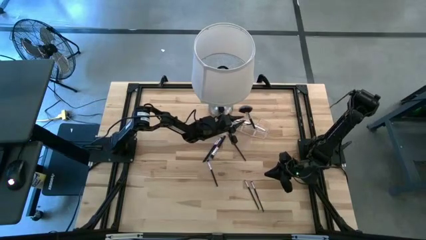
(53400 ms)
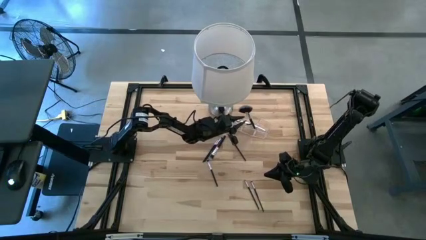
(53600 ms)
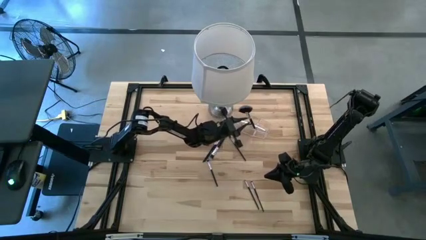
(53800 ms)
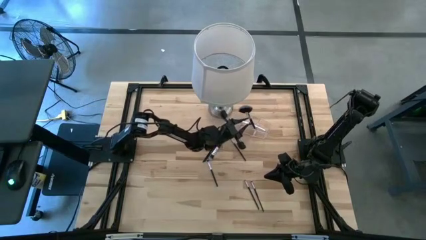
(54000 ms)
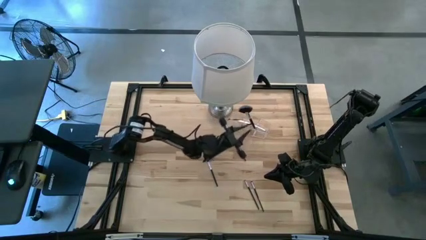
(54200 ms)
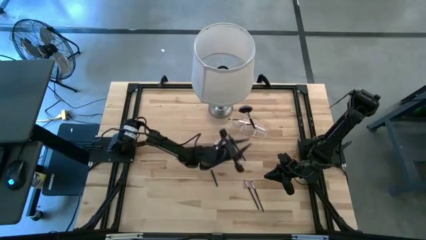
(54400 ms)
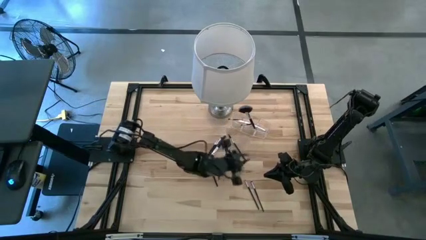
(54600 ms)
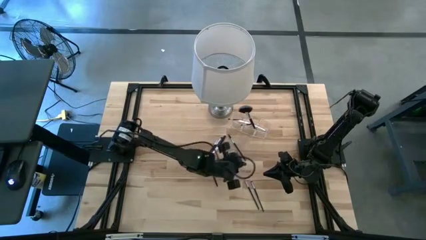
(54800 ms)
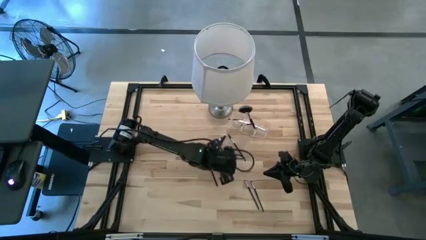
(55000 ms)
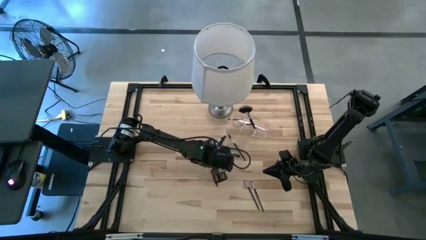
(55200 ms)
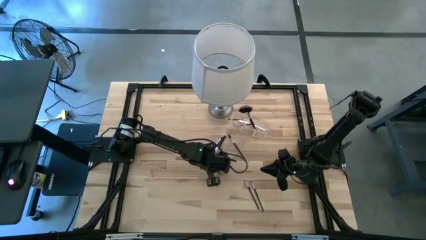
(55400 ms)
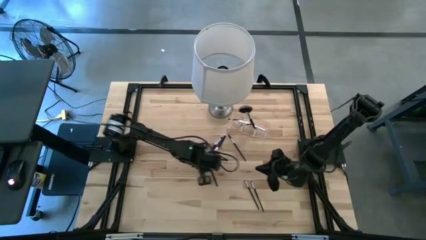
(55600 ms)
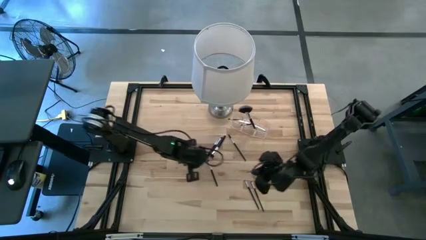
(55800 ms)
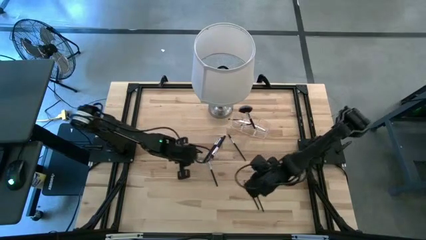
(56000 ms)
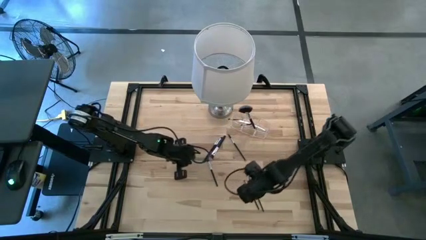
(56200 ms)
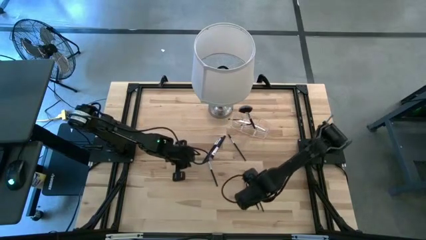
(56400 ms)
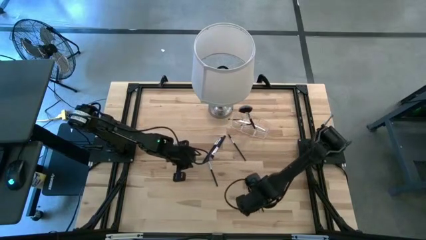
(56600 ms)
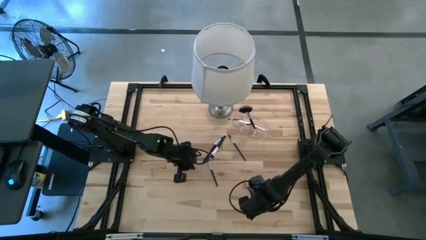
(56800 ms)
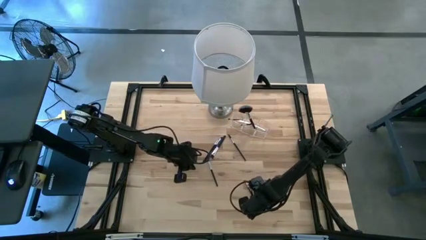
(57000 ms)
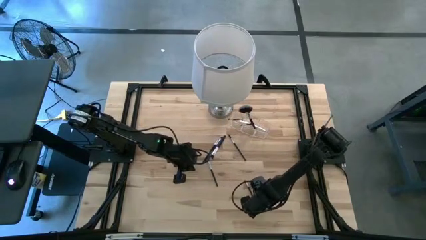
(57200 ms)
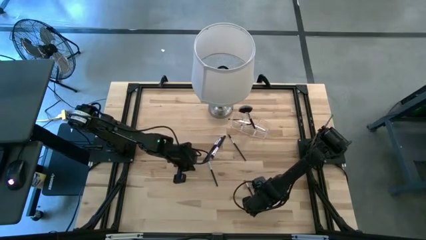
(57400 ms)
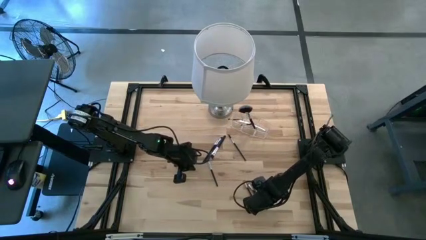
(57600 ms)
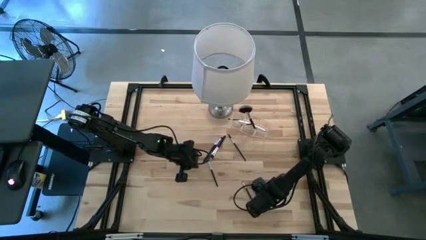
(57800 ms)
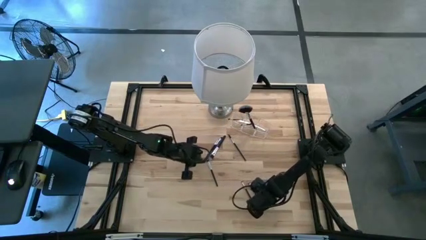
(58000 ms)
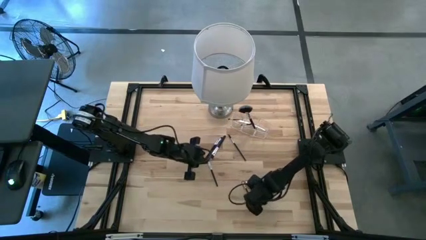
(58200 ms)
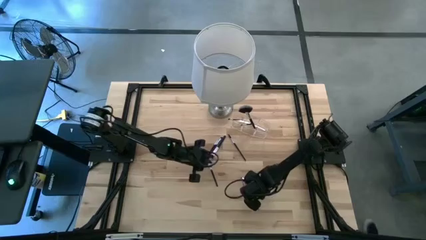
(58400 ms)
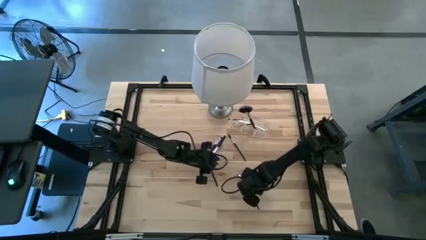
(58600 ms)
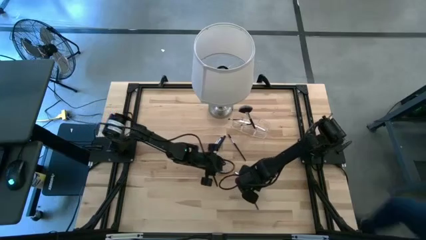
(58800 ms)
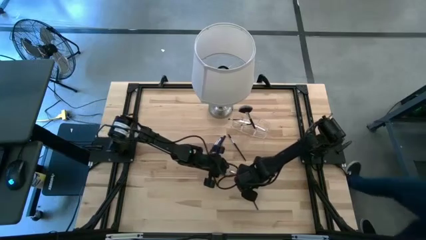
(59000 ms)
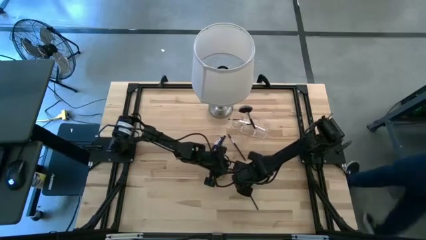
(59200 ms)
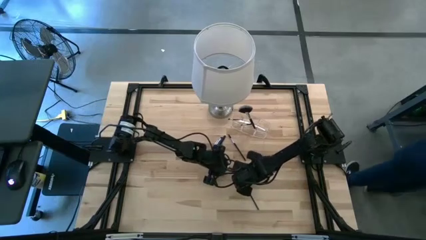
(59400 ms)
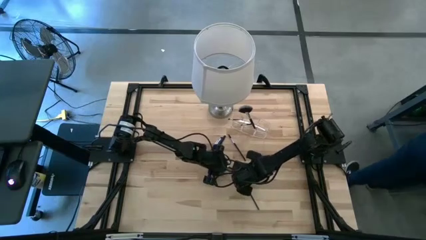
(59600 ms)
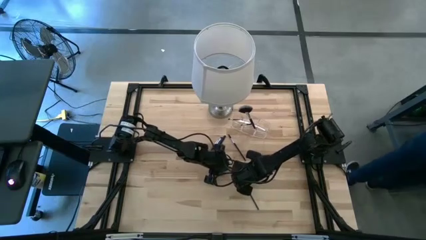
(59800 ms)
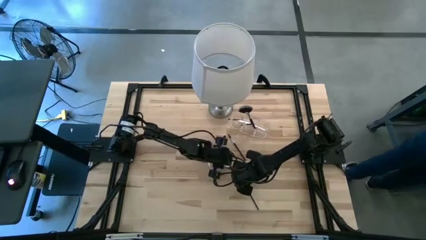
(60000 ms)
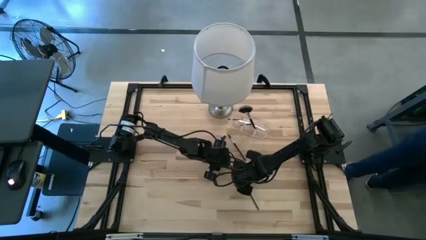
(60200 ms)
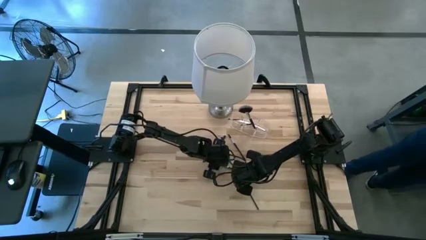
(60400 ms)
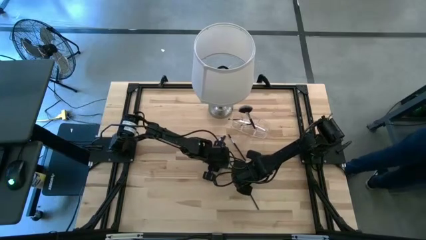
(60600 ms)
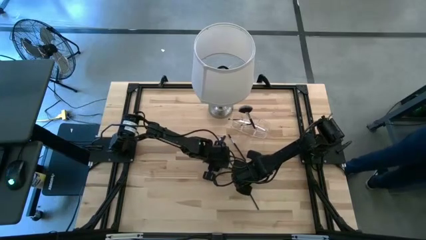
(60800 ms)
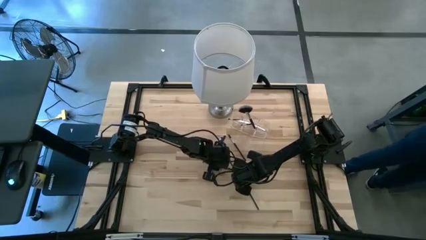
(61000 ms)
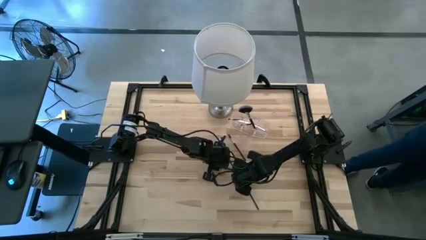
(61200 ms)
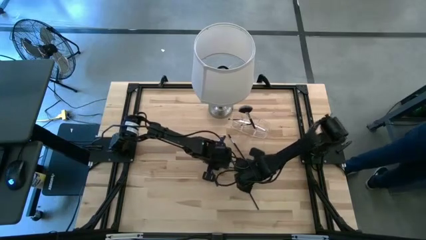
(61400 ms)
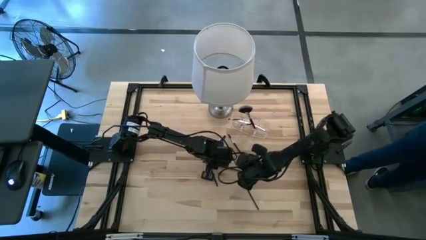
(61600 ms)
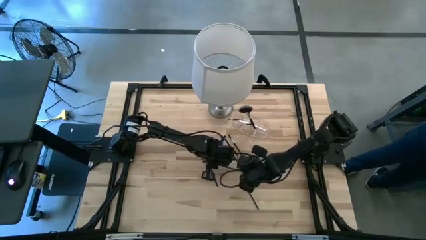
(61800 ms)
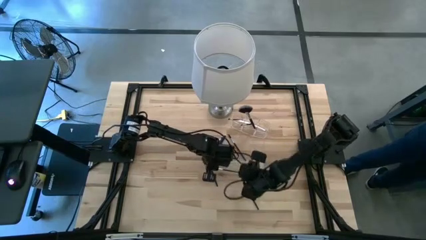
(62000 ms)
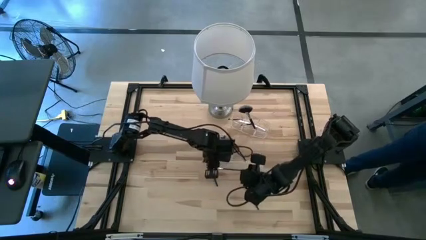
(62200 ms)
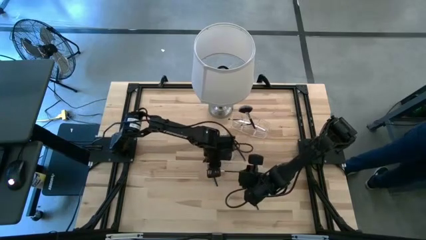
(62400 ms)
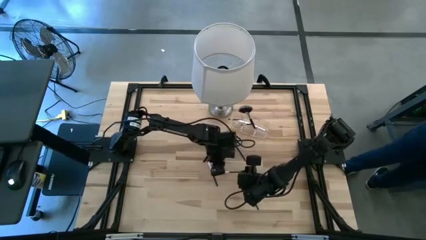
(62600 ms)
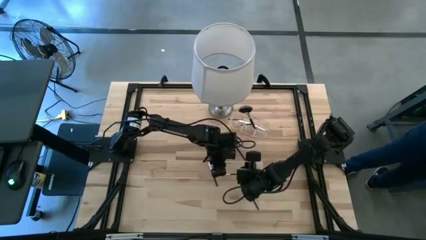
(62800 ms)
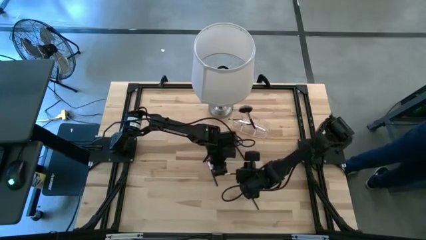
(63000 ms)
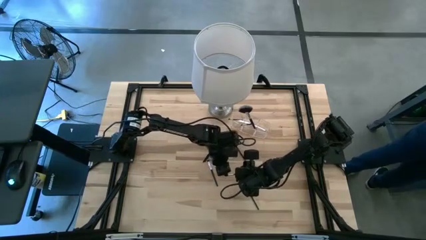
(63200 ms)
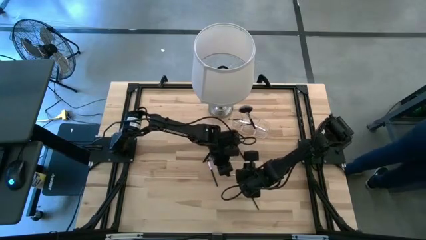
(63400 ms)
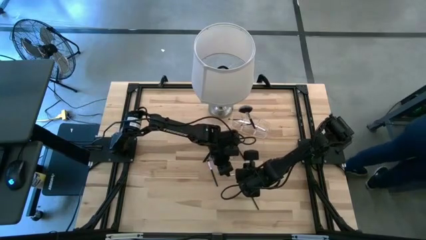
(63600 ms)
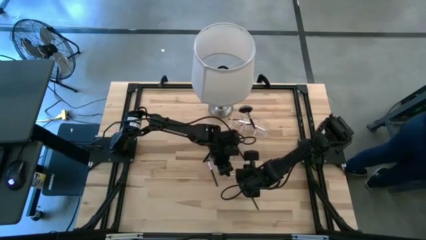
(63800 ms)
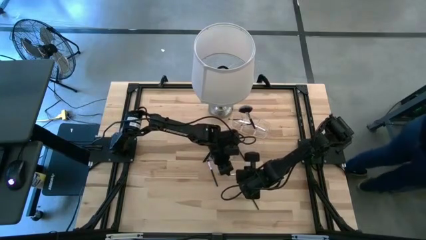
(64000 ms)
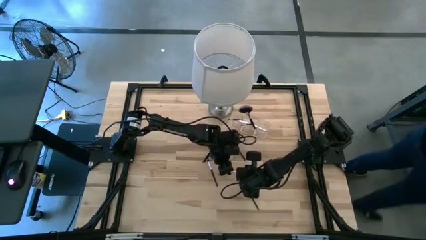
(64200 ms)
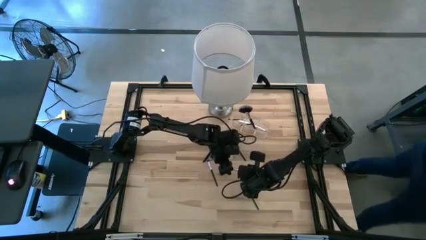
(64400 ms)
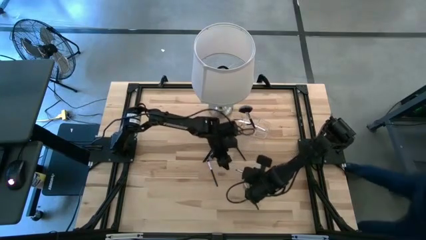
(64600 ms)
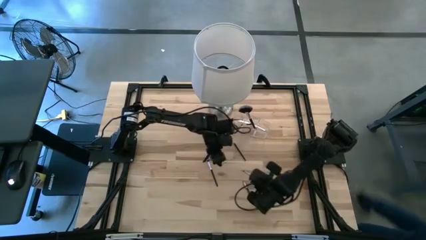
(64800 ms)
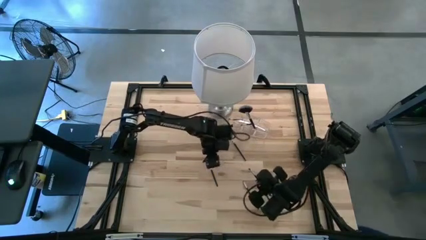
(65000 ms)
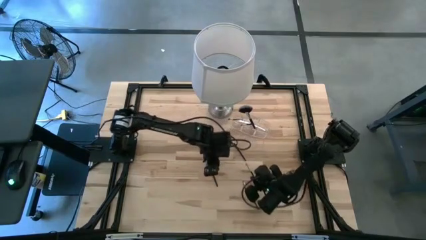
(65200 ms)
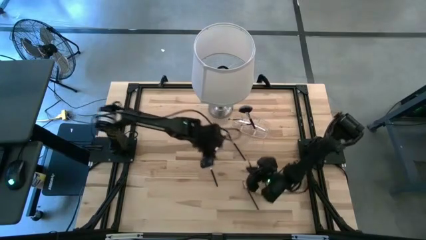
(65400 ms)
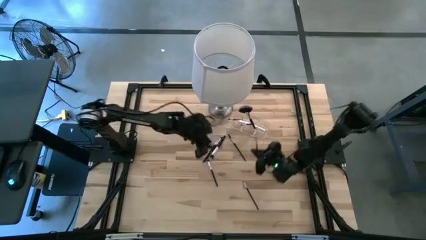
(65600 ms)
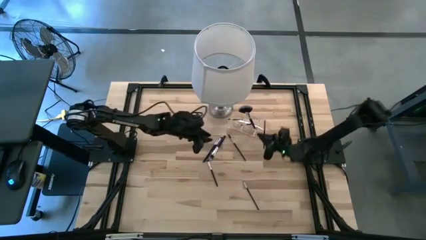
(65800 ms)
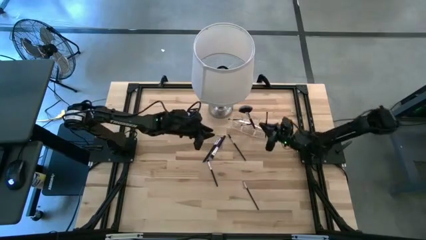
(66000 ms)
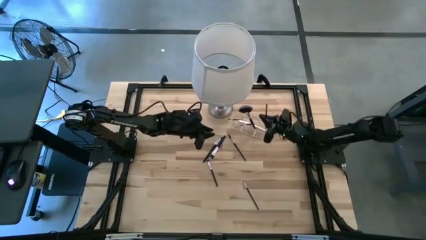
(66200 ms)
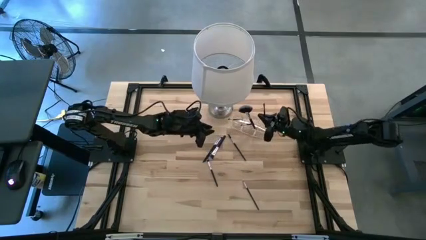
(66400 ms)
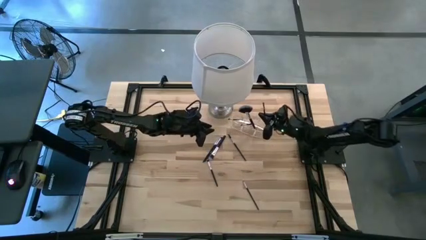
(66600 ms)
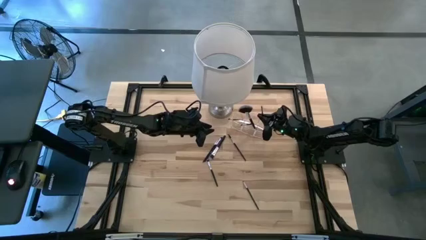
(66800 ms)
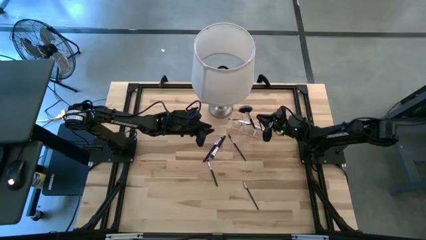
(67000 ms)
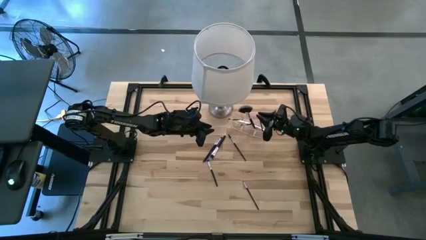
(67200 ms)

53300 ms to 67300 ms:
Task: Put items in baskets/containers
Put the black eyeshadow brush into the transparent organizer

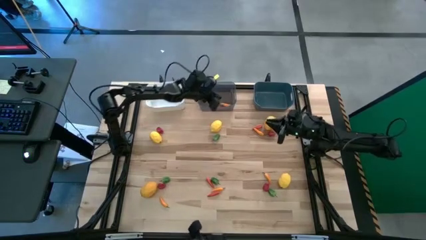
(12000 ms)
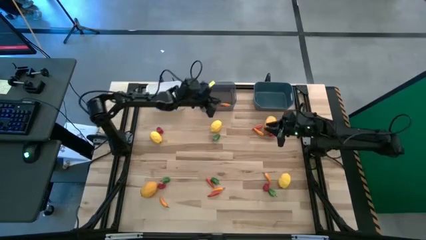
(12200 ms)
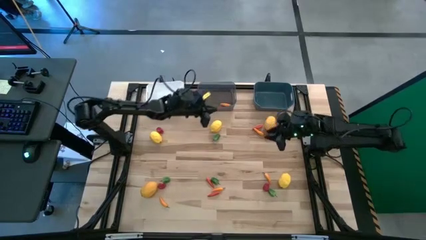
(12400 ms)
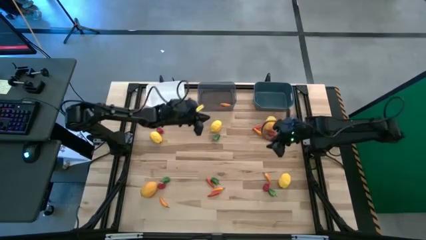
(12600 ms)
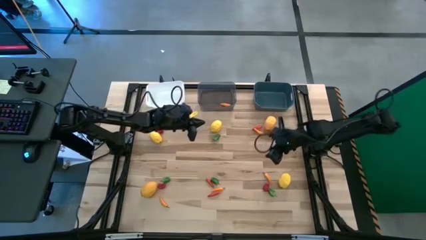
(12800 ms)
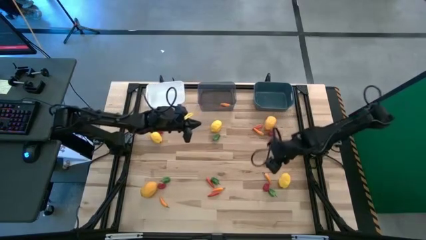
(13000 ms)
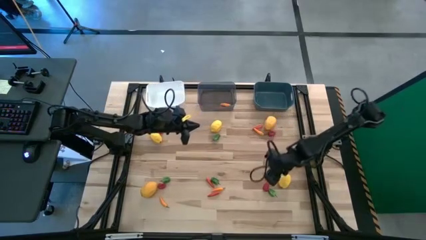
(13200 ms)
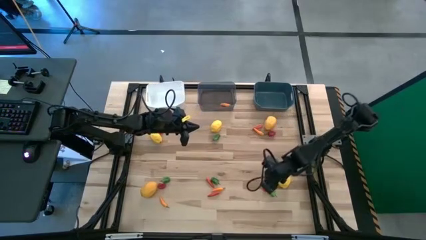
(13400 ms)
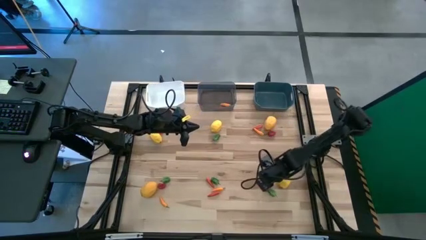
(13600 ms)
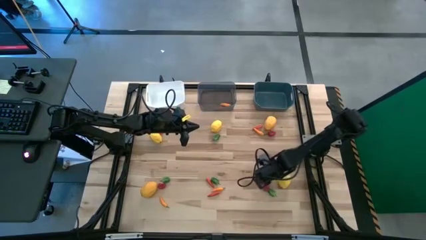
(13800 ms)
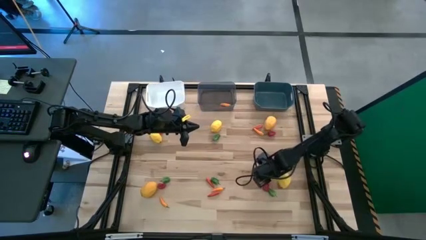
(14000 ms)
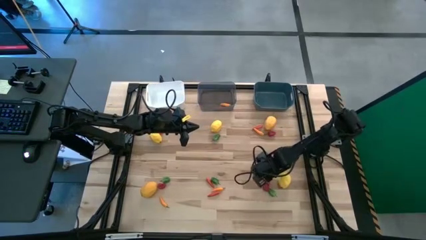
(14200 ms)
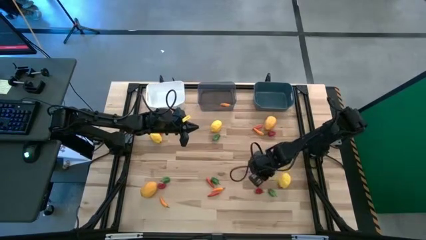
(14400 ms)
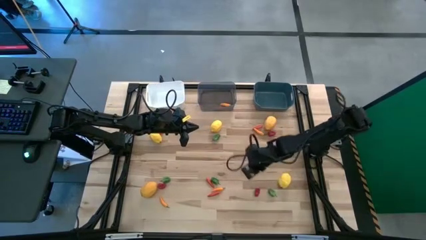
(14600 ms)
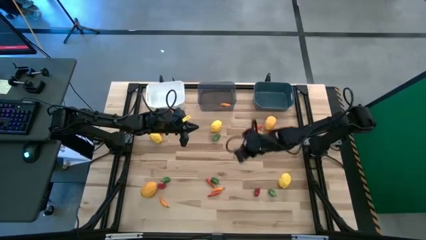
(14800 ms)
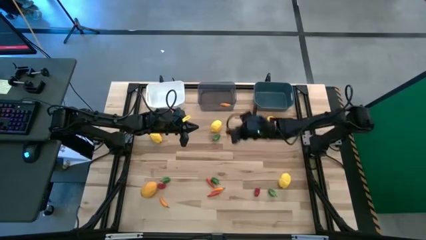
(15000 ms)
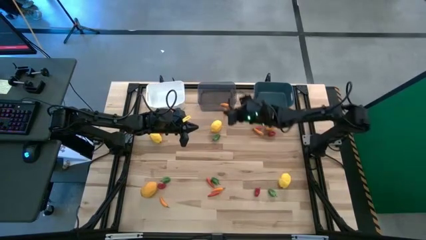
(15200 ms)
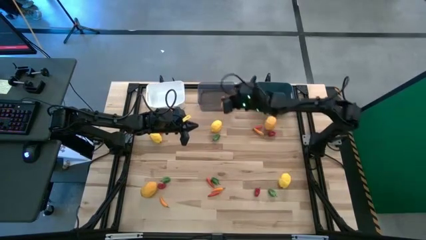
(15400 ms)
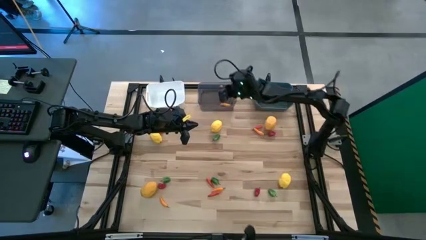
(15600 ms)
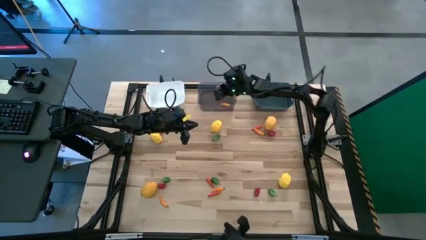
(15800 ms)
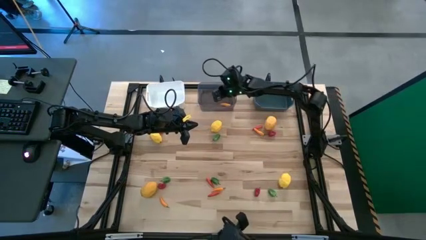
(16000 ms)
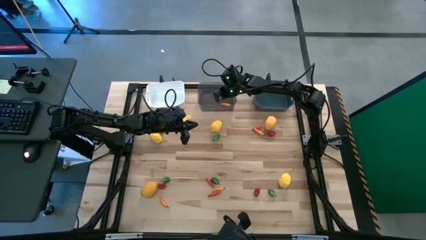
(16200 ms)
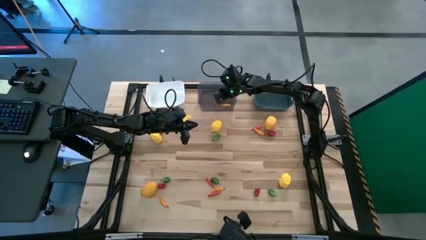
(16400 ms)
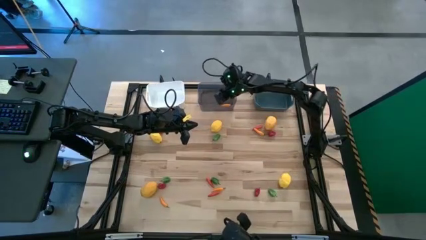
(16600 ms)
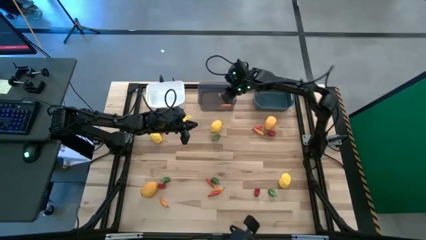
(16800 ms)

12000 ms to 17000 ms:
Task: Sort produce into baskets
Put the bottom right yellow chili pepper into the black bin
